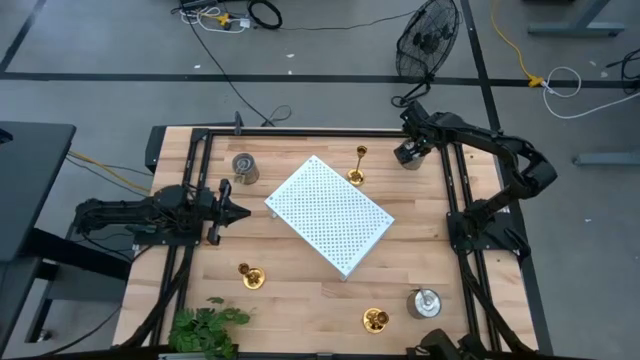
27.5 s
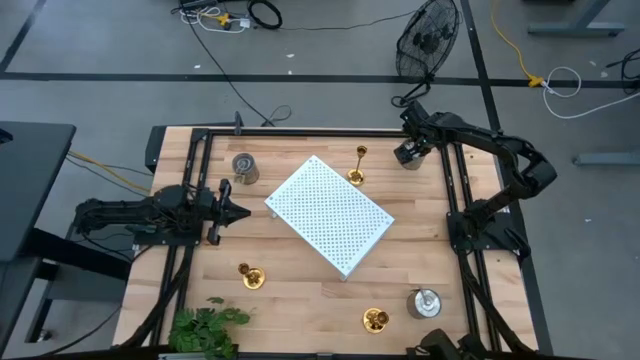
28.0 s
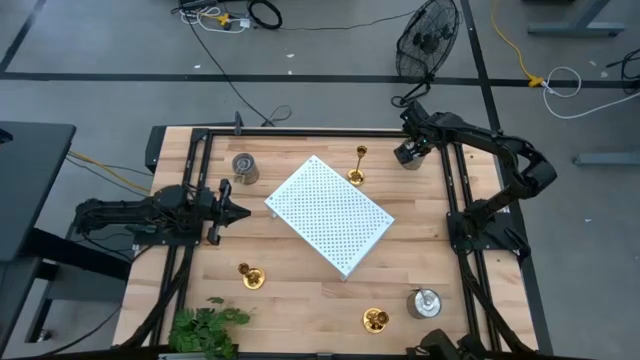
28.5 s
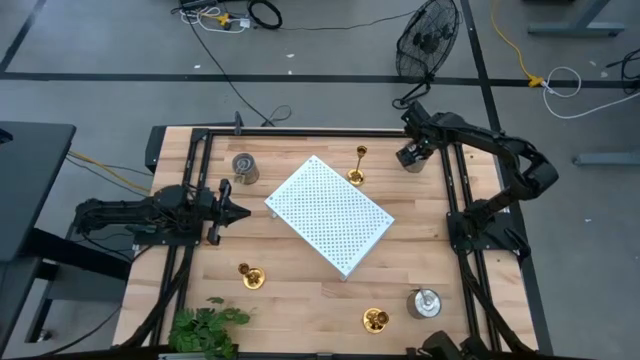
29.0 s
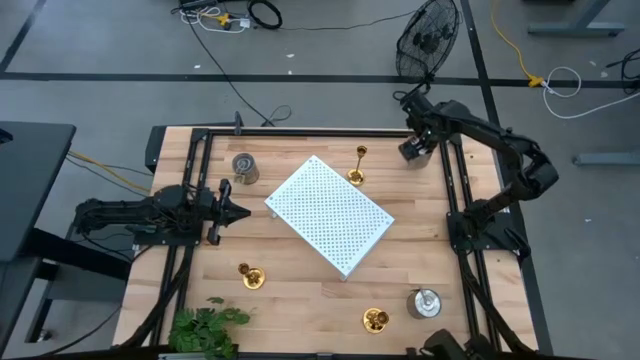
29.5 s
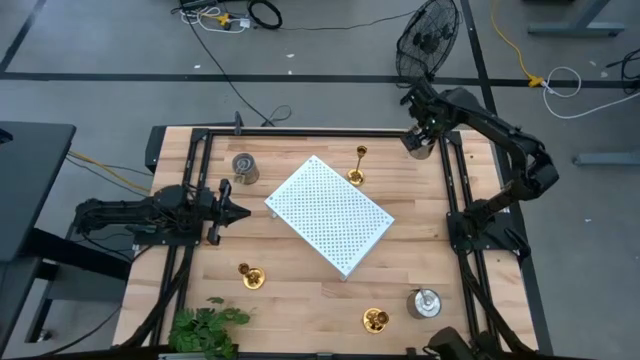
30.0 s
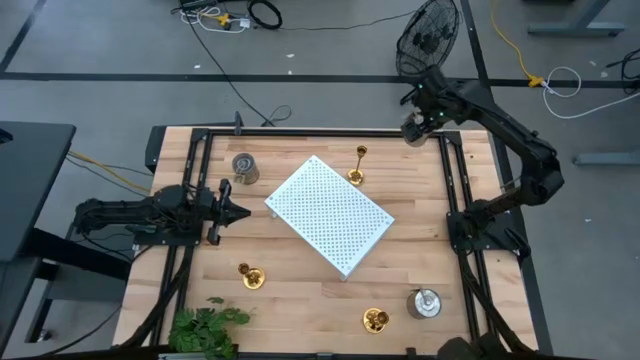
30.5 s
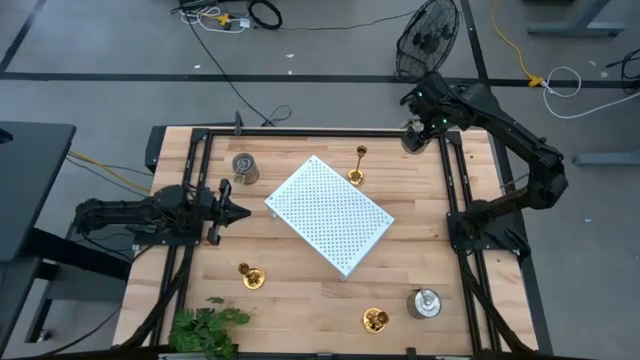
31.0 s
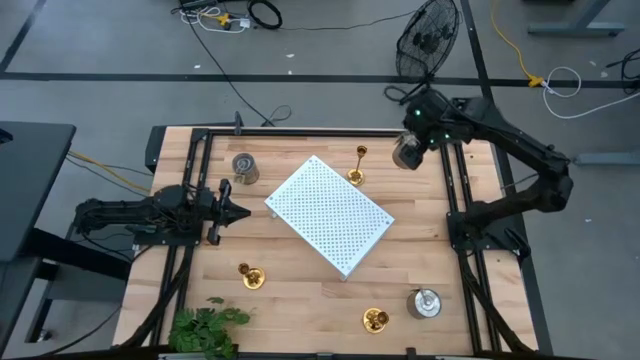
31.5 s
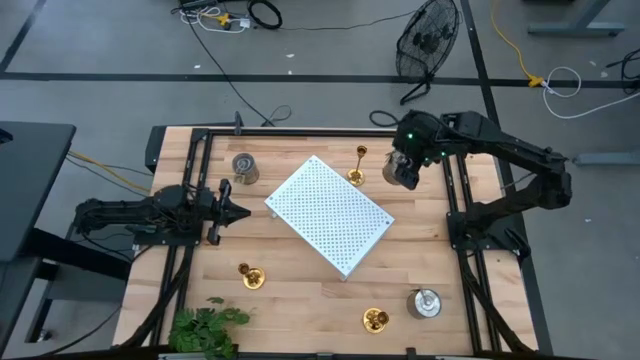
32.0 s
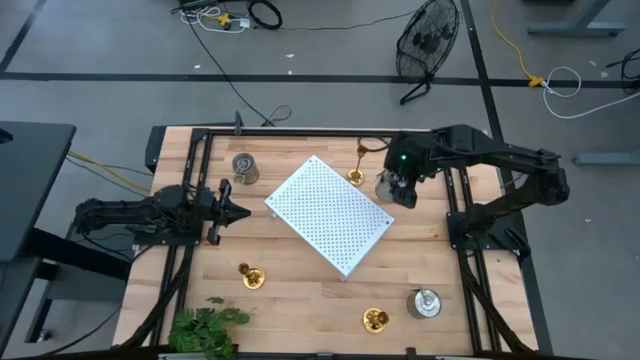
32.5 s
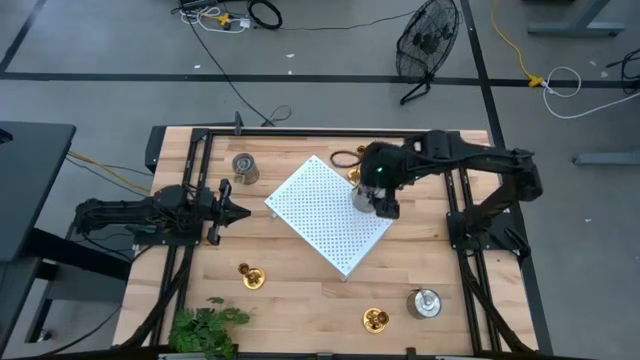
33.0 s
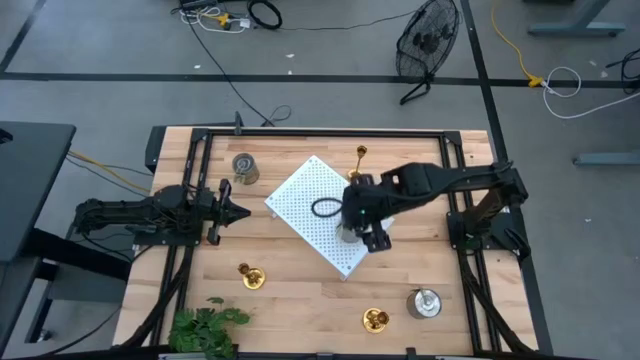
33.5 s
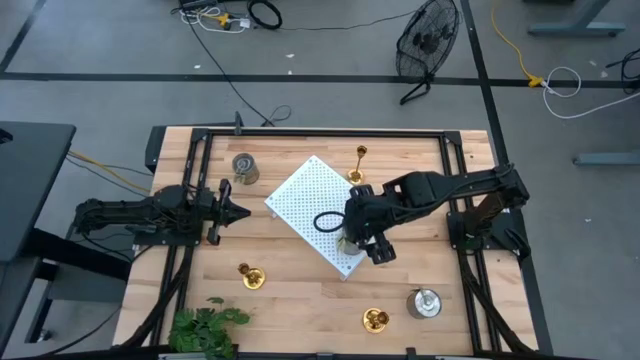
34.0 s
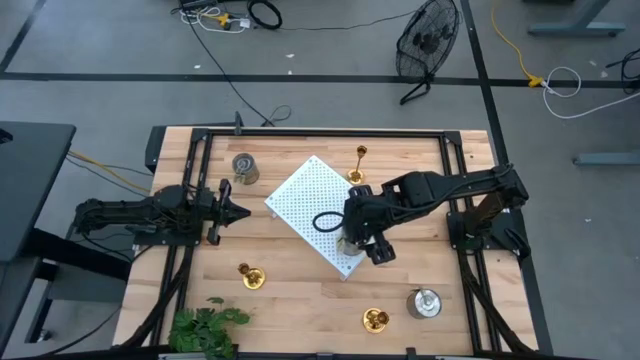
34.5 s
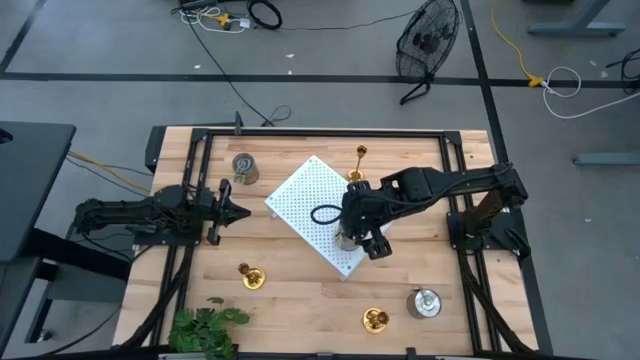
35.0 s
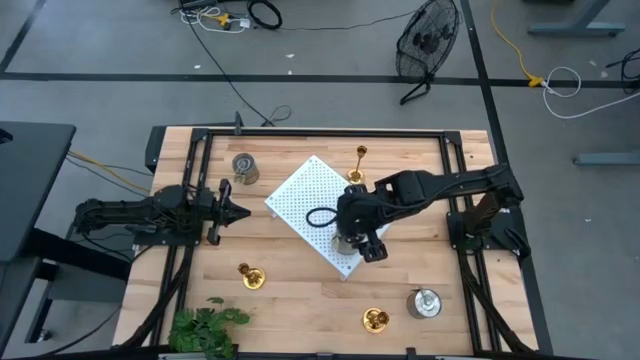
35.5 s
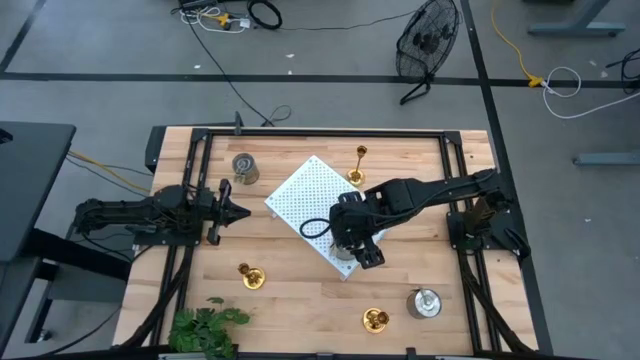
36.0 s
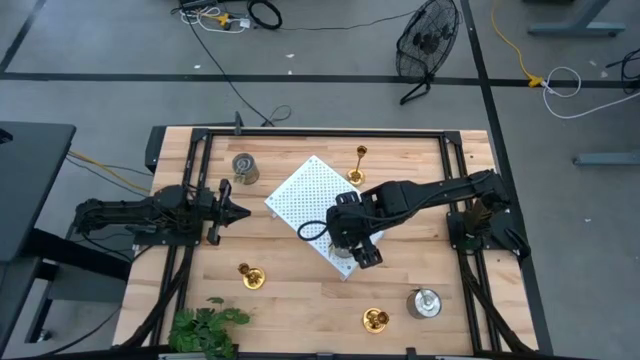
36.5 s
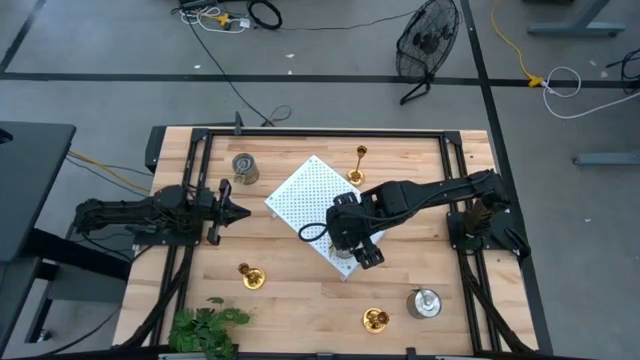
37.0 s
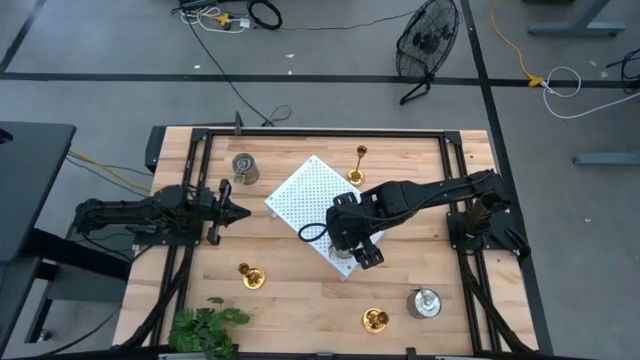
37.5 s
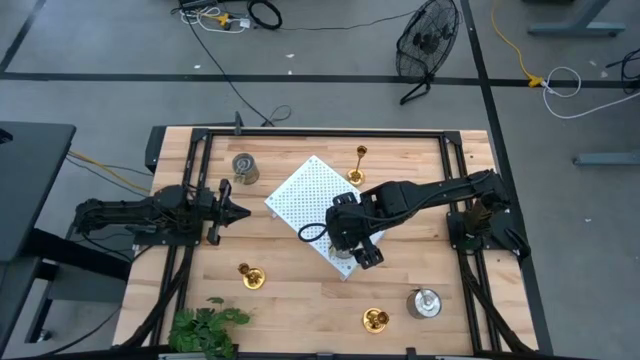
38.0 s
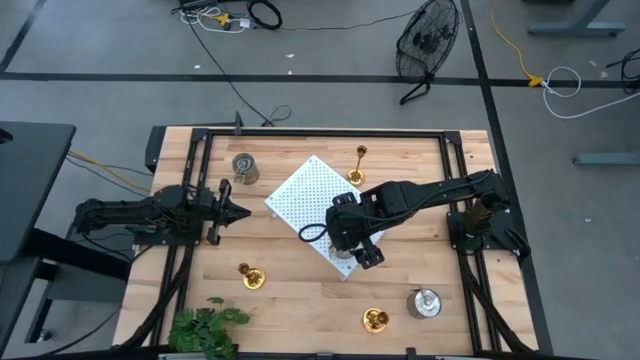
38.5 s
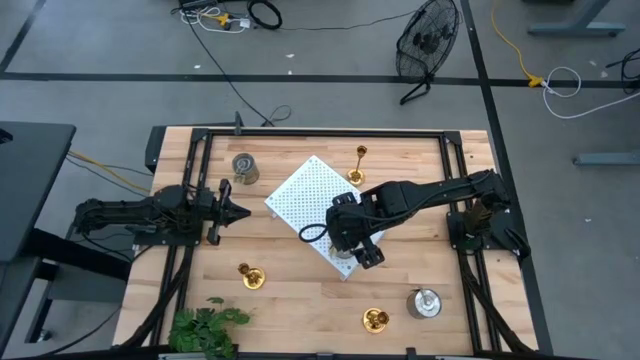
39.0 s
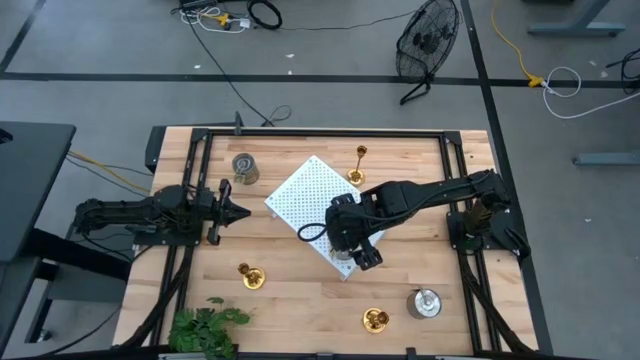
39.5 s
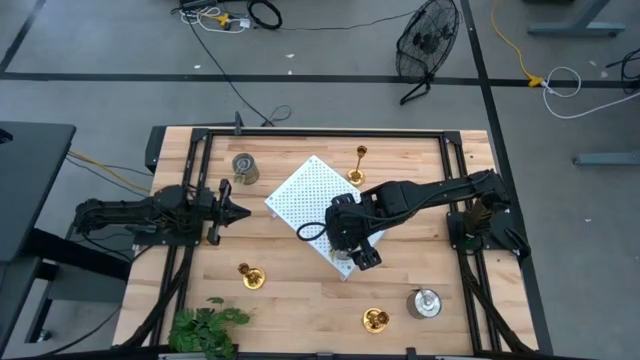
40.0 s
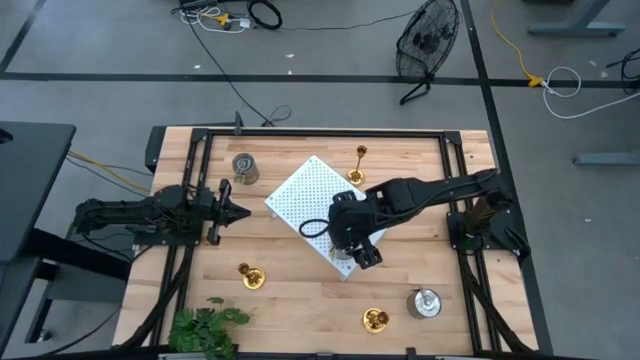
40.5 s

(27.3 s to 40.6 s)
Task: Pick & Place candle stick holders
Put the top right scented candle on the shelf

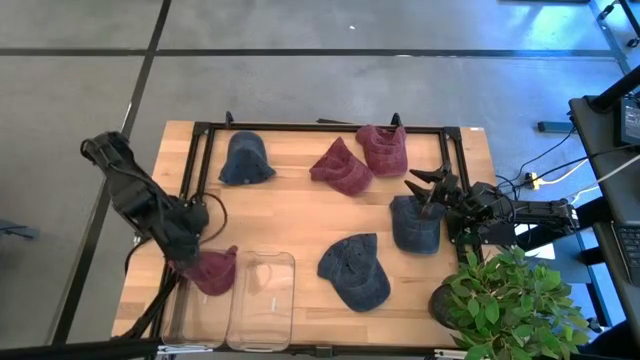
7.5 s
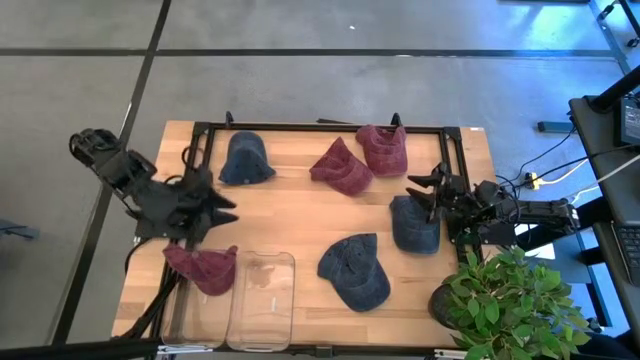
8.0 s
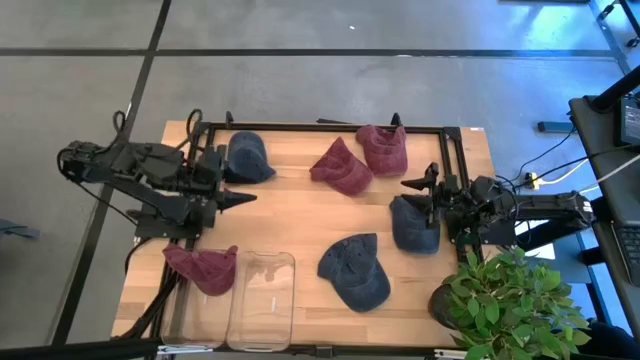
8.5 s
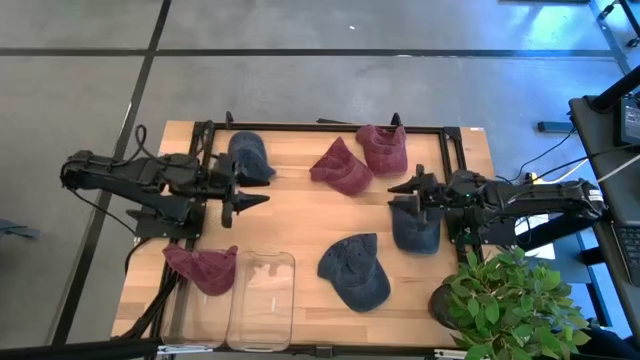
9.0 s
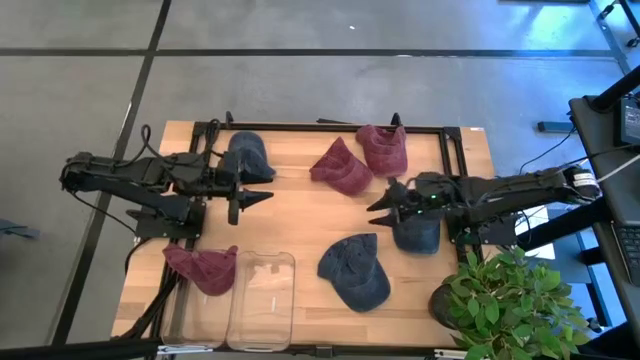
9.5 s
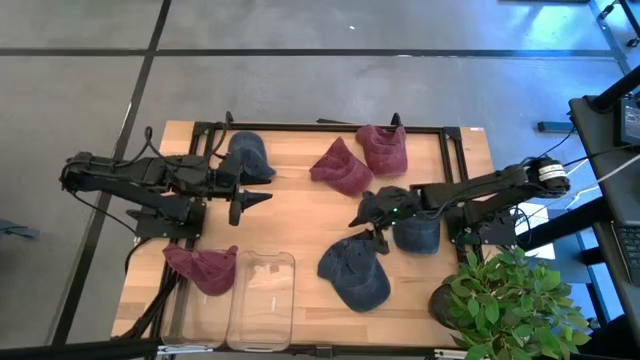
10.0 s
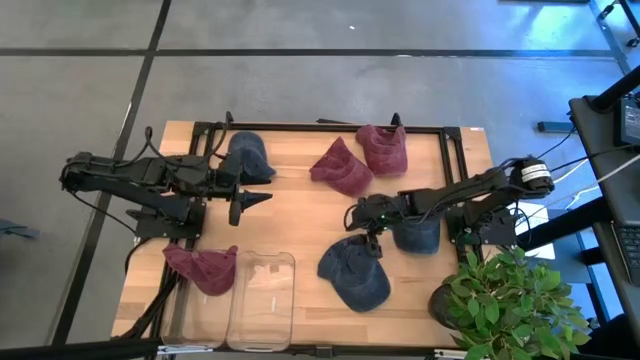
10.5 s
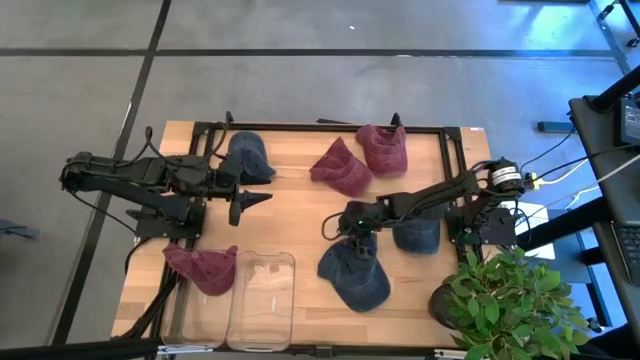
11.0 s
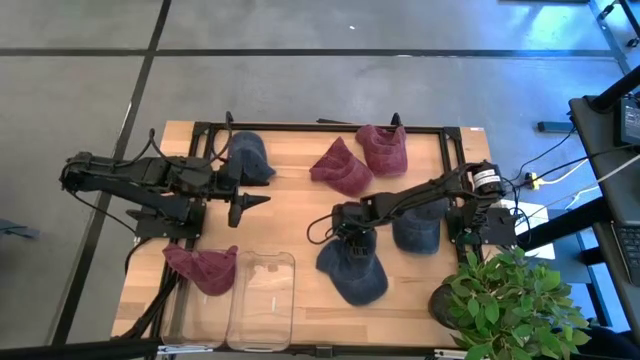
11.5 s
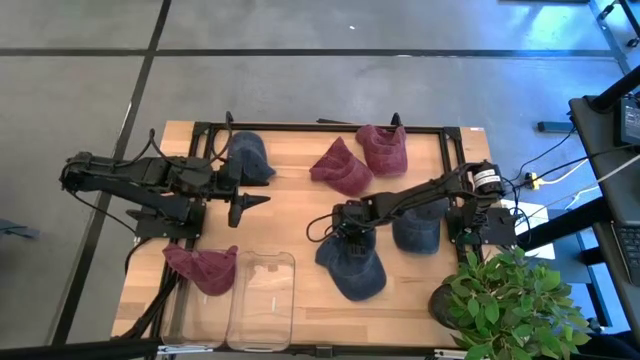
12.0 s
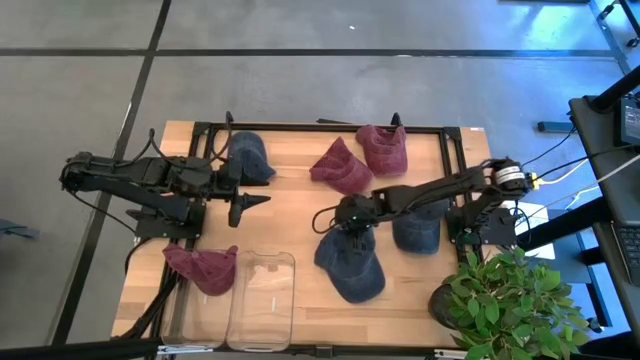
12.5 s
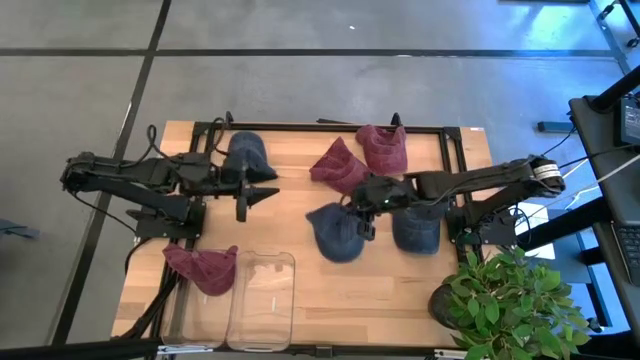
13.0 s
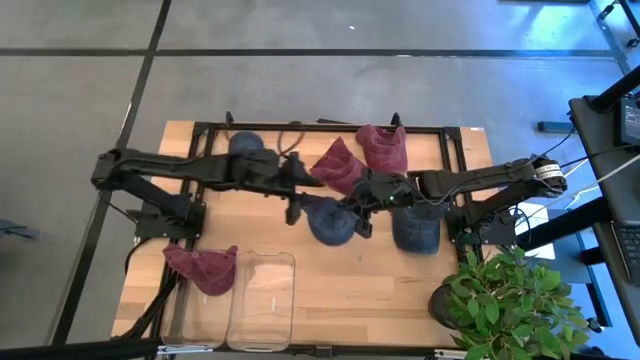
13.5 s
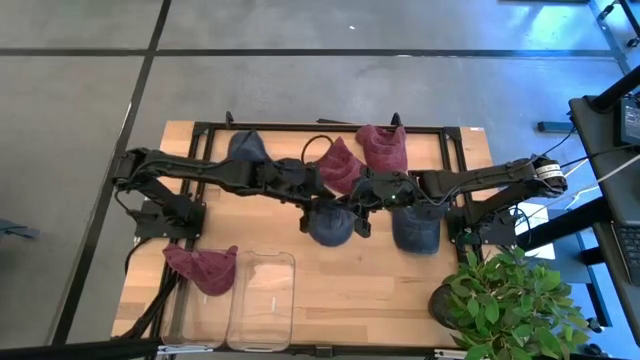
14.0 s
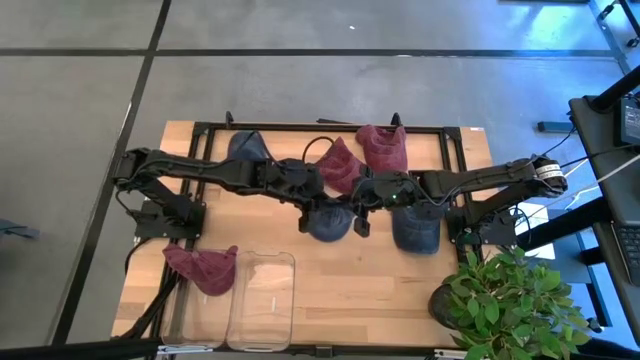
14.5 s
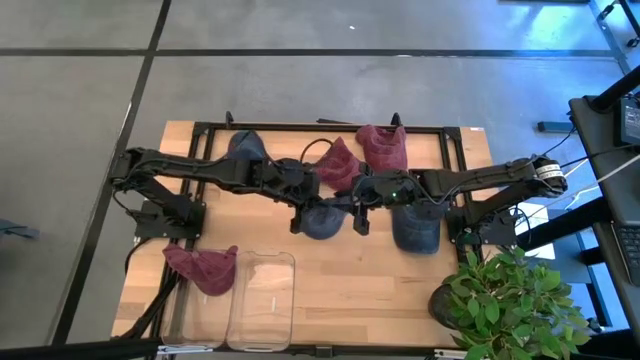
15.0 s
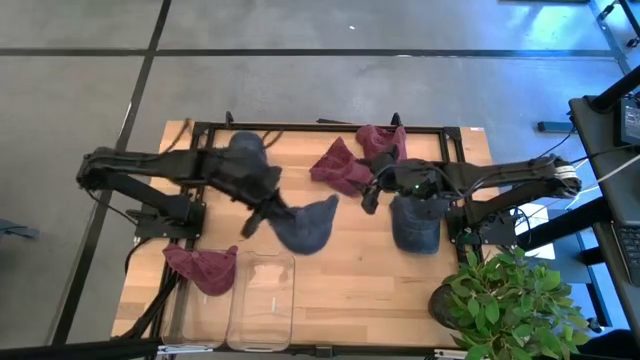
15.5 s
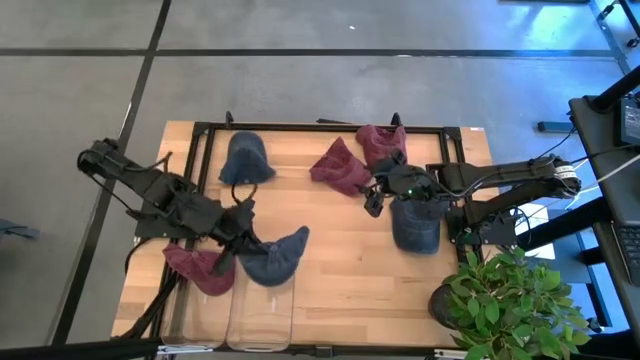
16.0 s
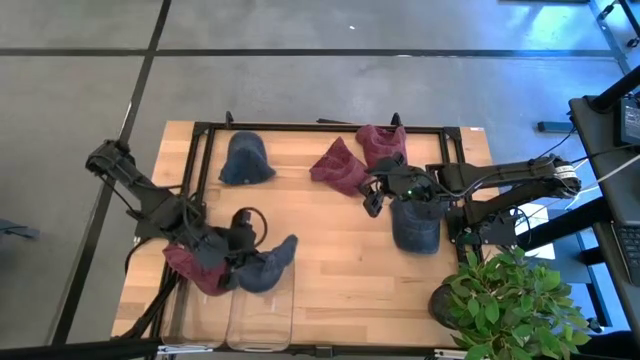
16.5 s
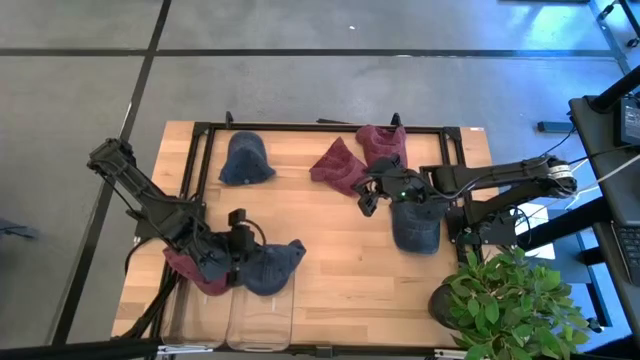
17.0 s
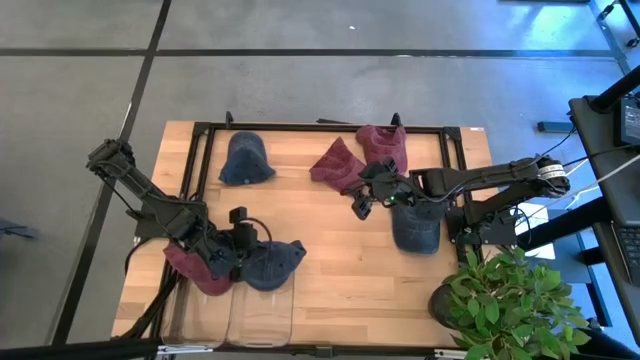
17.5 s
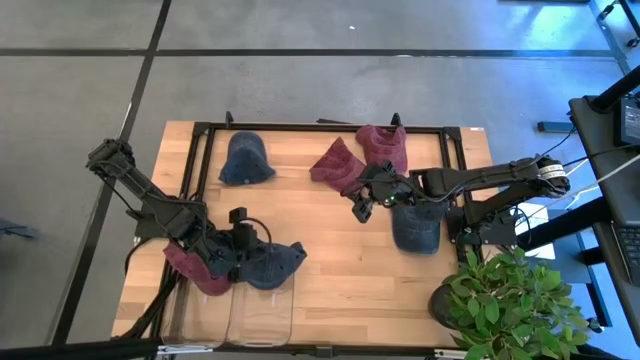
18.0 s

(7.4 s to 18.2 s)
Task: Pick & Place hat
Put the bottom blue cap into the right transparent bin
